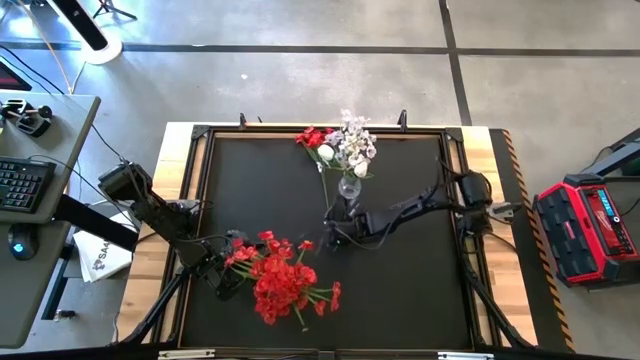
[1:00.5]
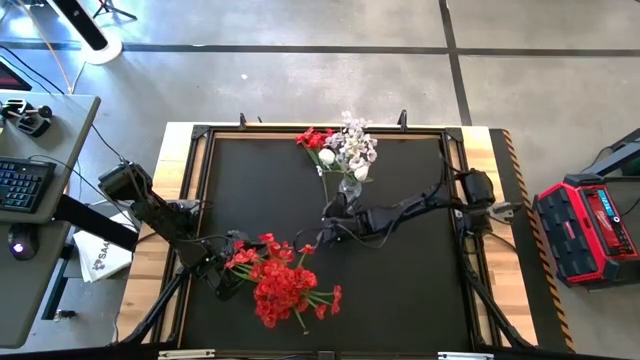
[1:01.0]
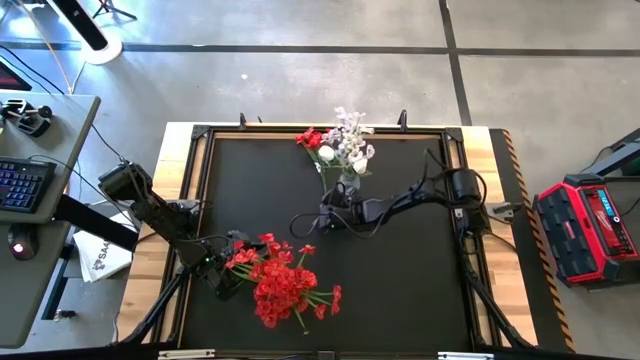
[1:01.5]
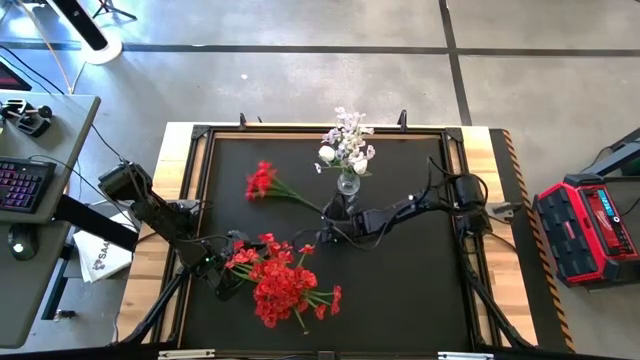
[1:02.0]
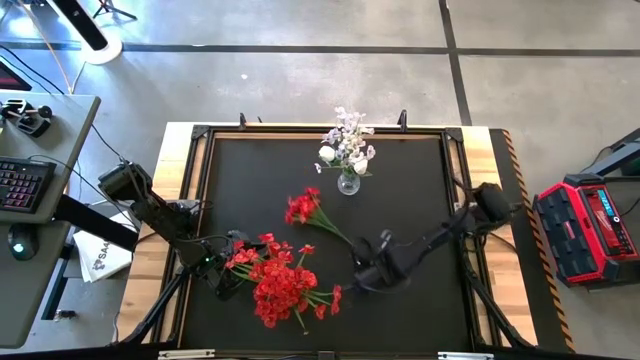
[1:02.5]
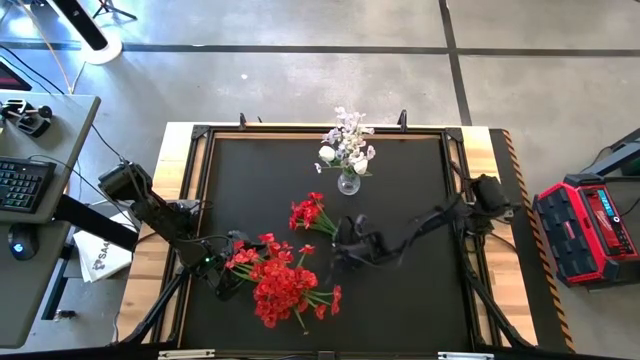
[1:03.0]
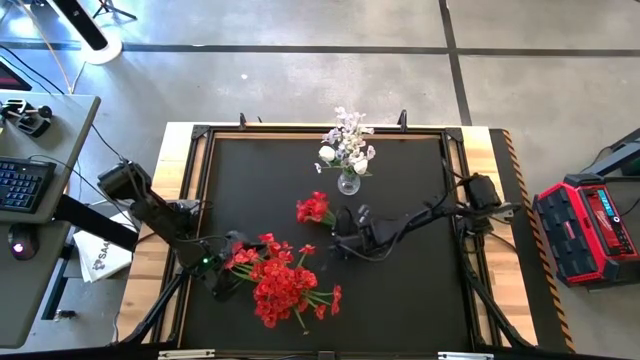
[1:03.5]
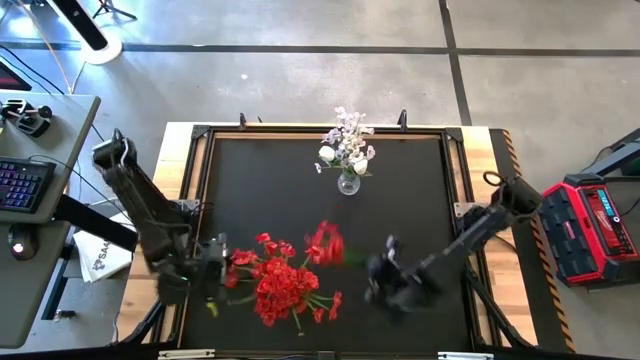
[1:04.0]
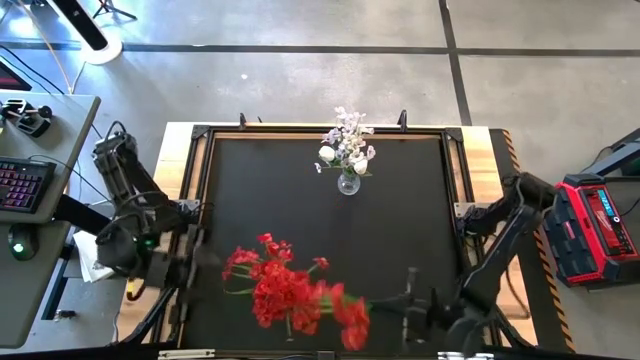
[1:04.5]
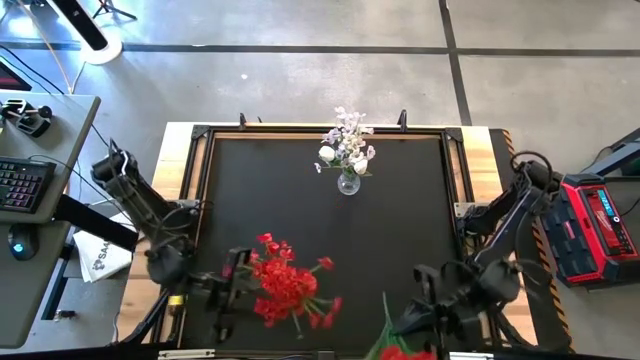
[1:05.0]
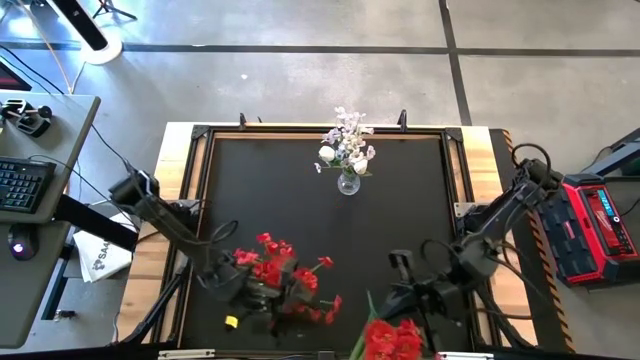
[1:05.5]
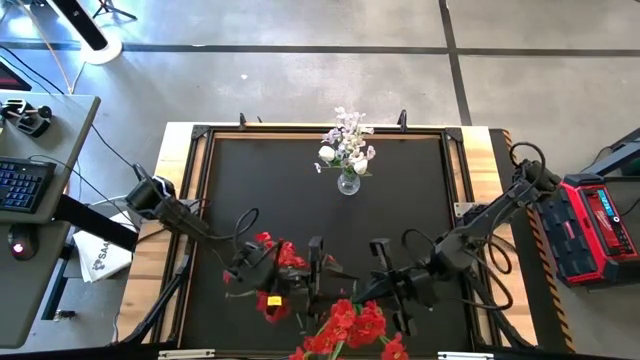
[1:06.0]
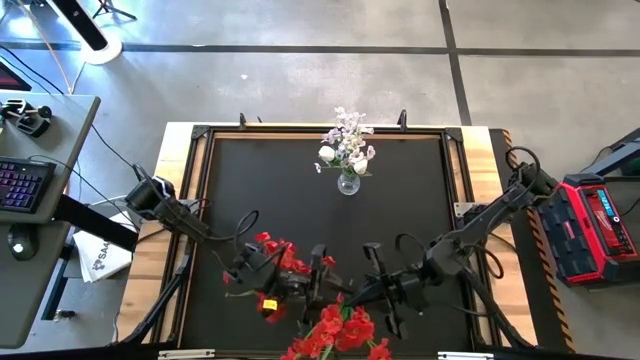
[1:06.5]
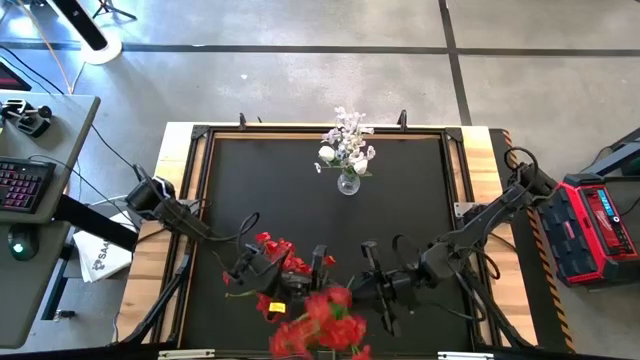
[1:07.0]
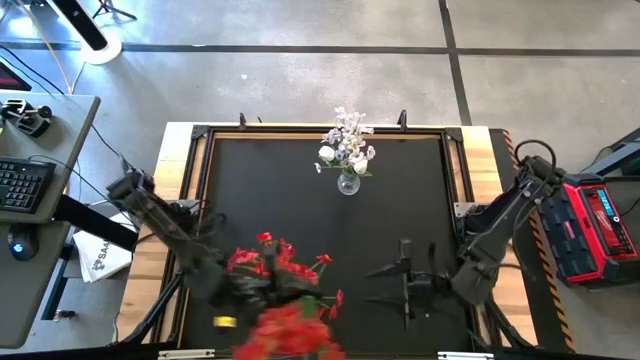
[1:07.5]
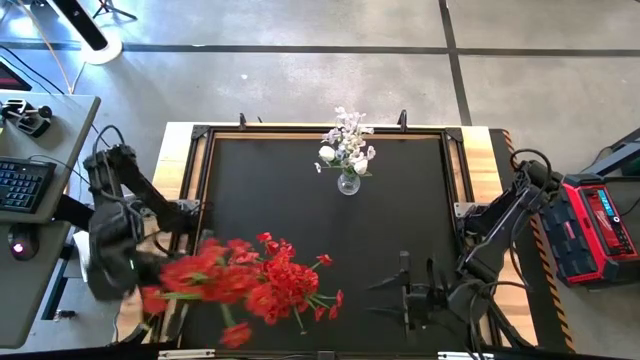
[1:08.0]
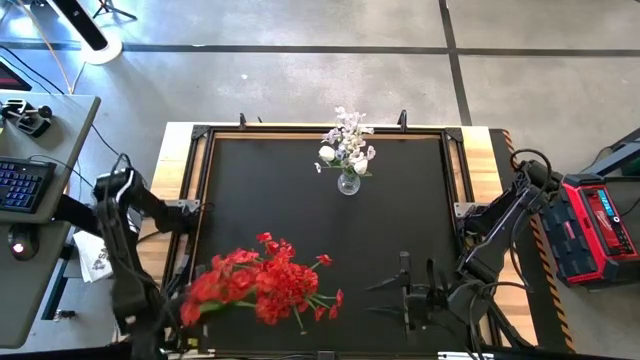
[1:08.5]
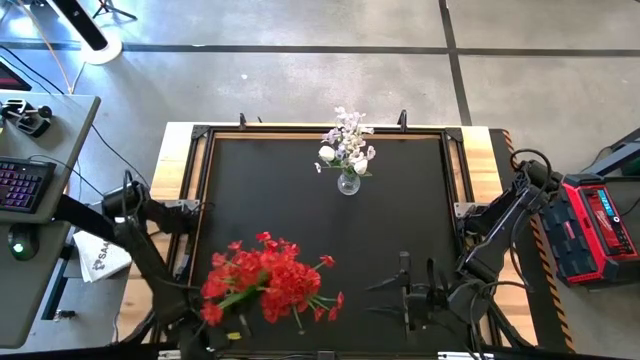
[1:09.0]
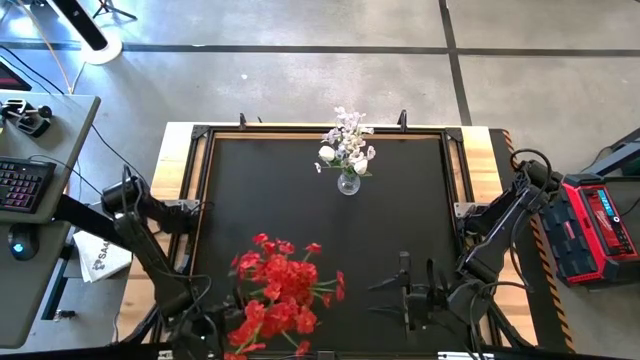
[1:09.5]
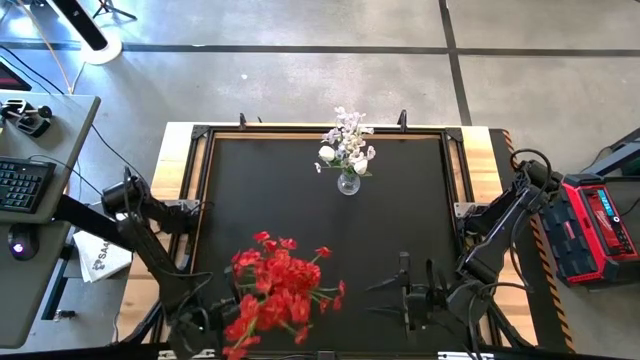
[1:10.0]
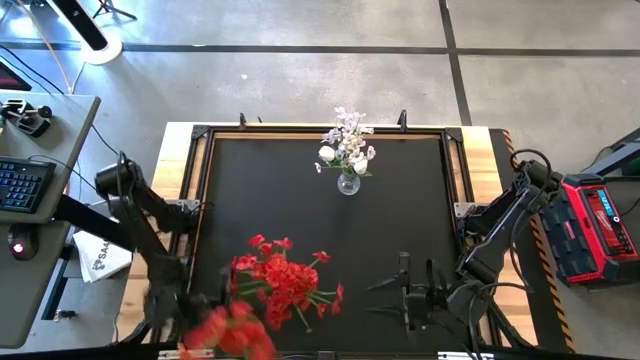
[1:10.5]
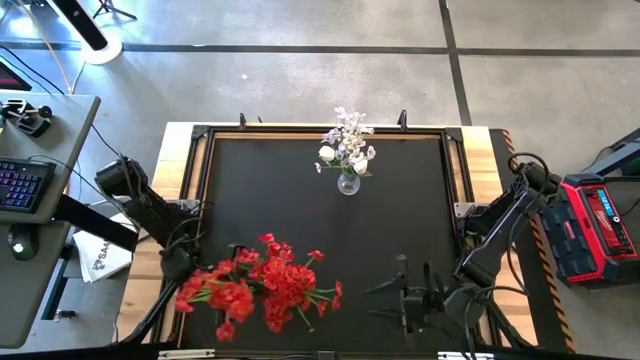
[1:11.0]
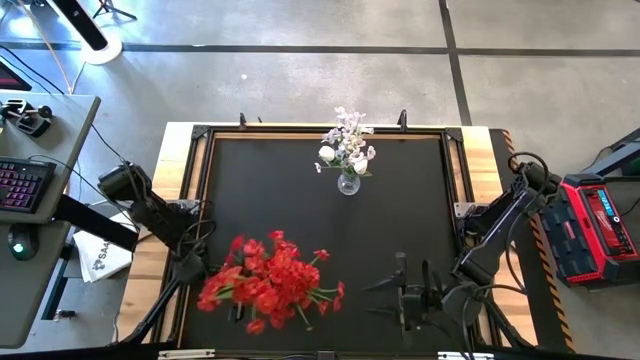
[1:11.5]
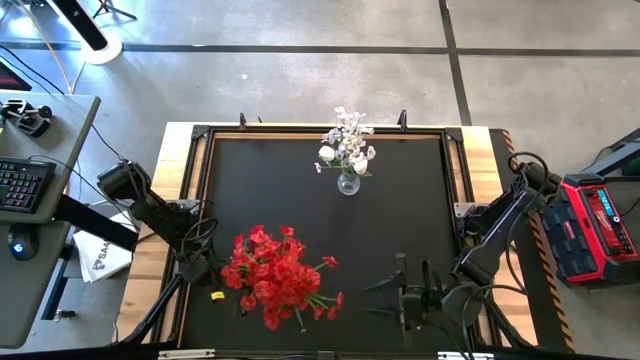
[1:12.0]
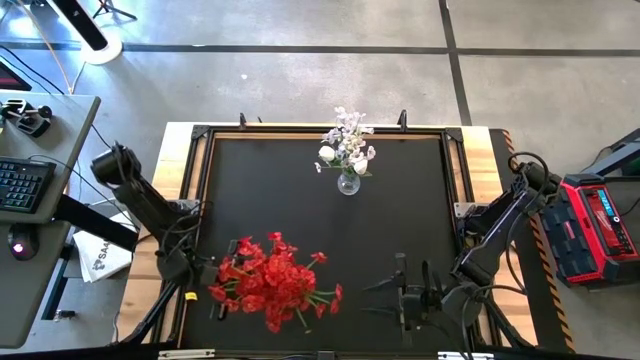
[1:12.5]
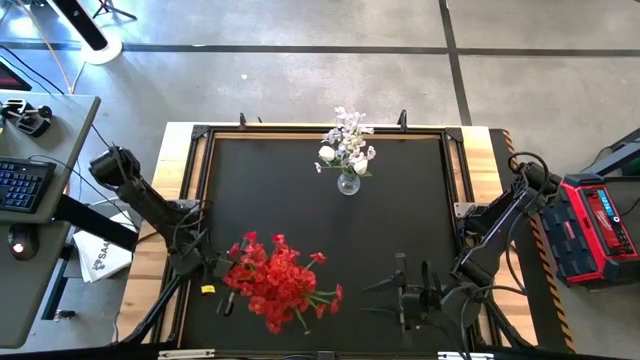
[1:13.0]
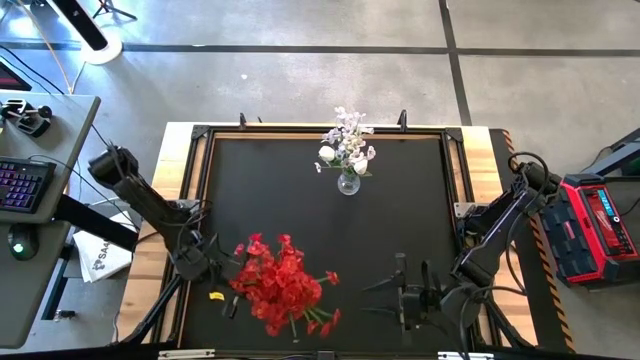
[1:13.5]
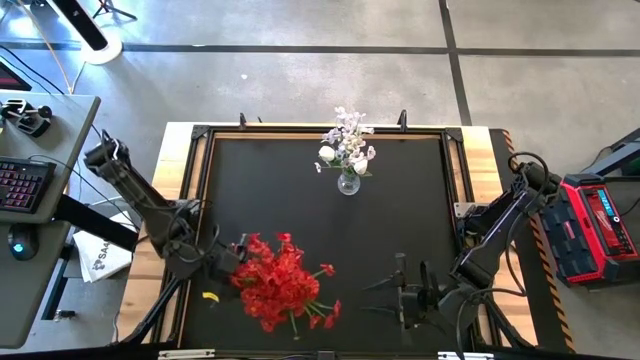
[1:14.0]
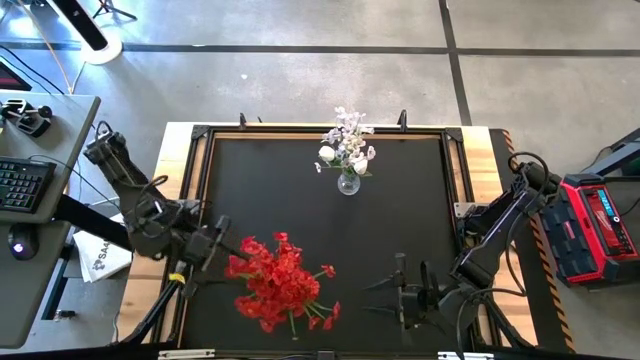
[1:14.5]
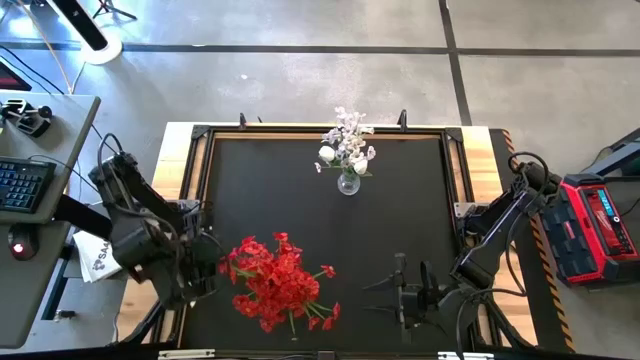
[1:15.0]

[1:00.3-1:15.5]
Task: Sort flowers into vase by color
Put the red flowers into the blue vase

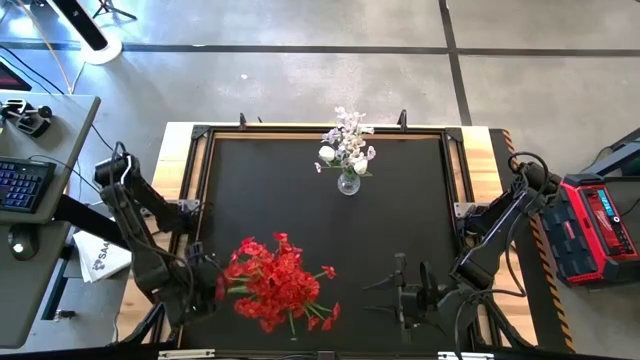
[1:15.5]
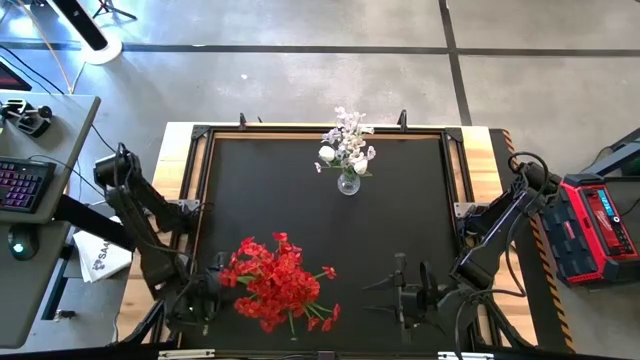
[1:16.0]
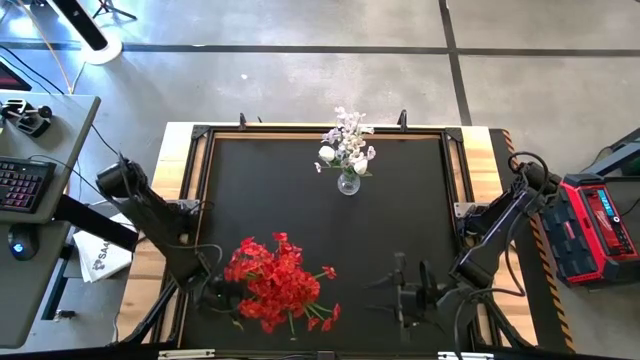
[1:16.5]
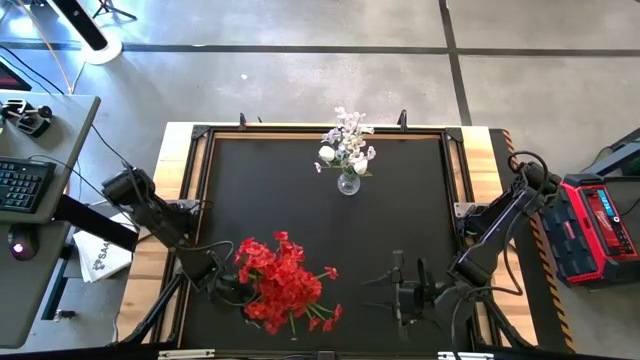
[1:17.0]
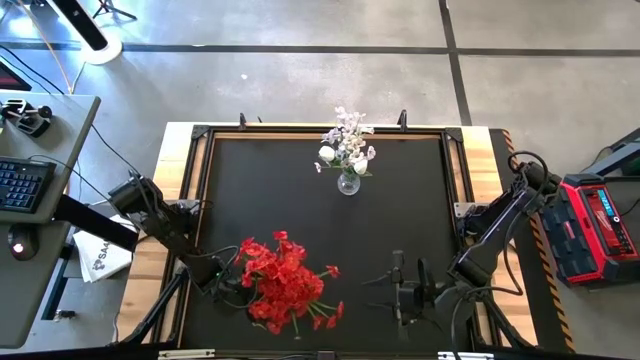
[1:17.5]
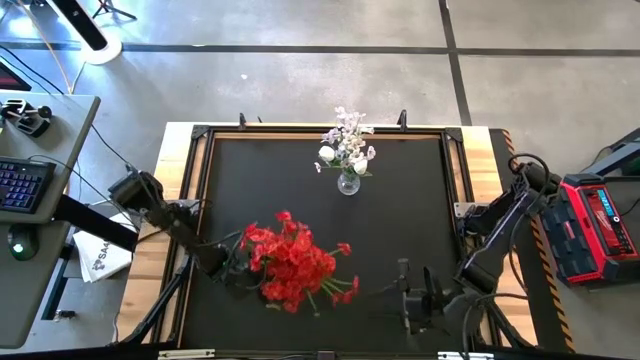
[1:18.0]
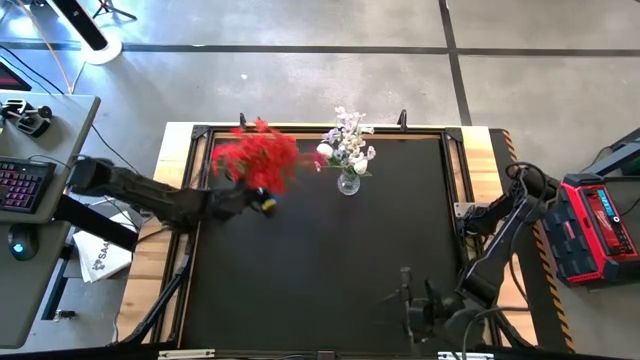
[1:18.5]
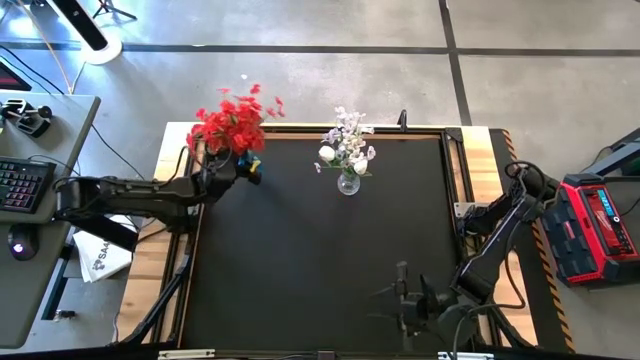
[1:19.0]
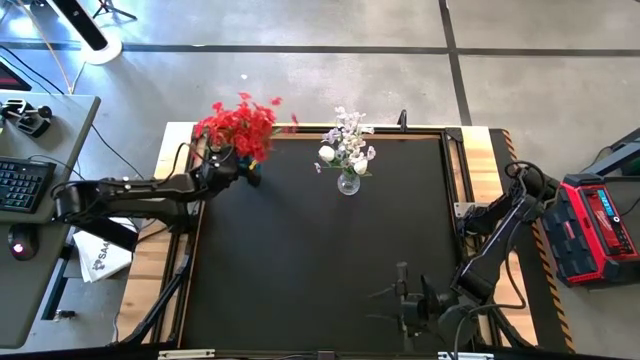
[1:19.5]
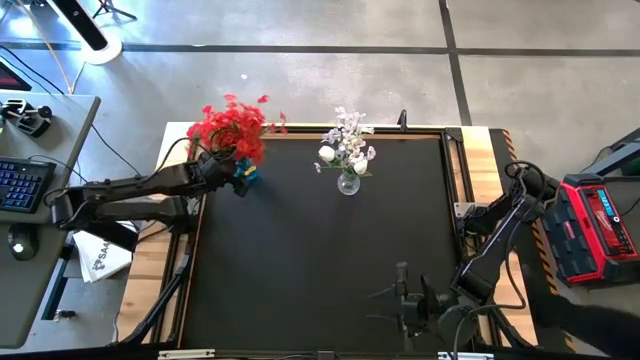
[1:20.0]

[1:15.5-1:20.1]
Move the blue vase to the top left of the table

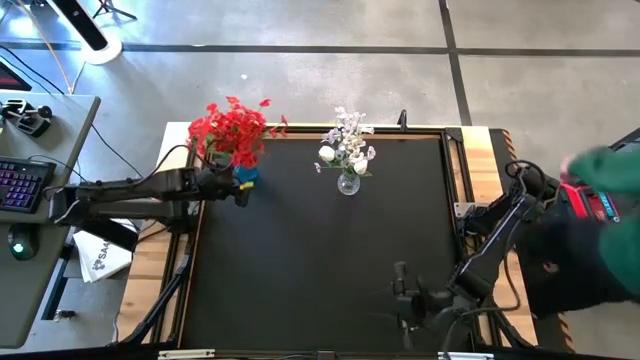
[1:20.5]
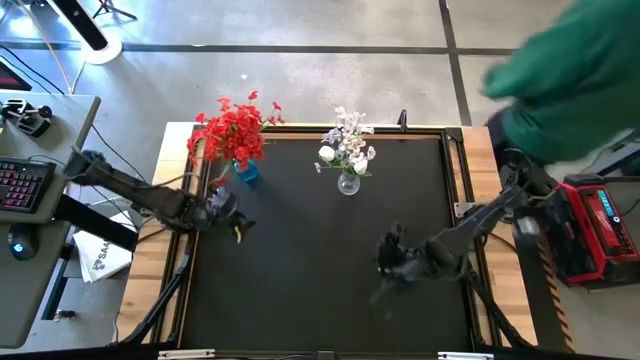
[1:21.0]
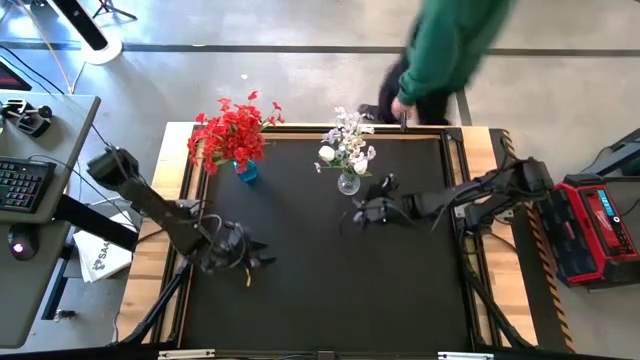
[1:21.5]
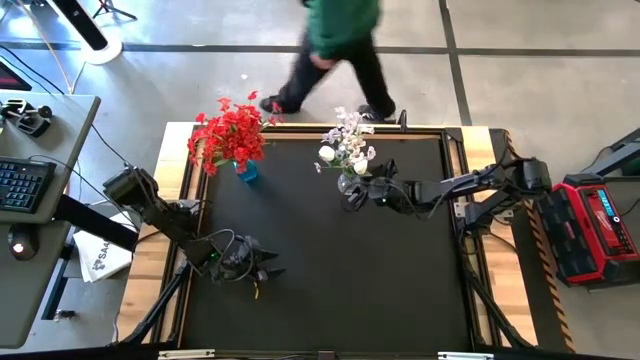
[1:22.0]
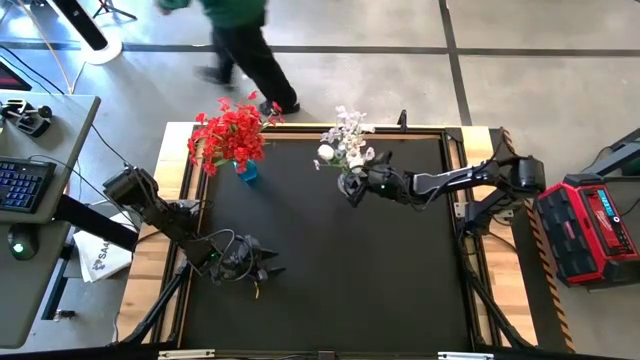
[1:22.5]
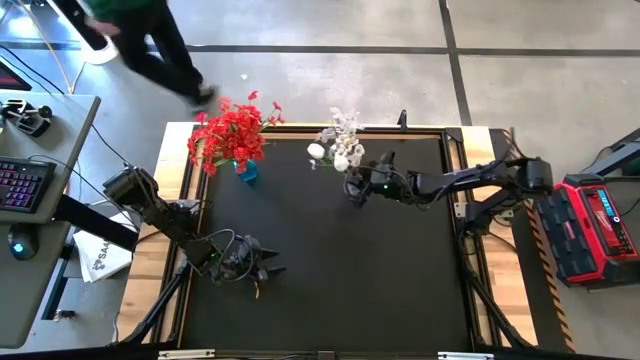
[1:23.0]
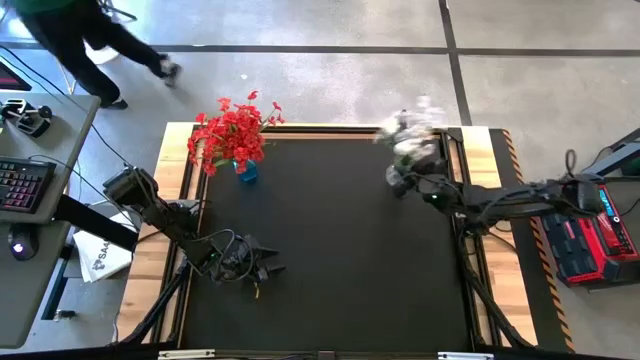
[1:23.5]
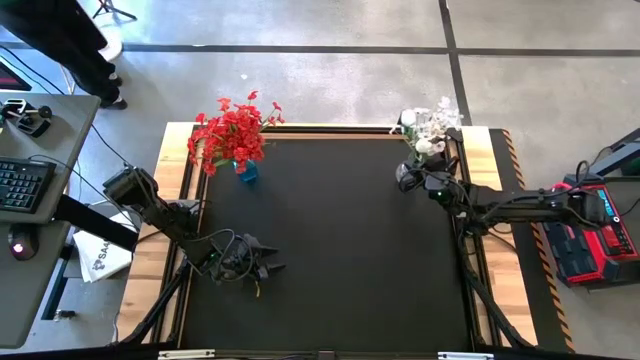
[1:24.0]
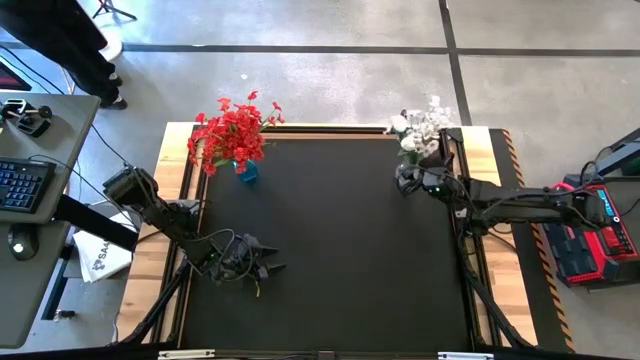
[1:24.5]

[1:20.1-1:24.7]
Move the transparent vase to the top right of the table
